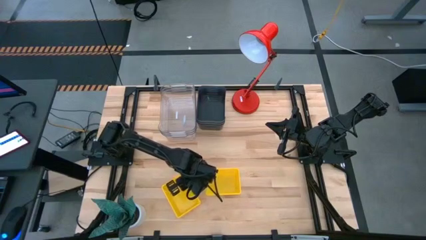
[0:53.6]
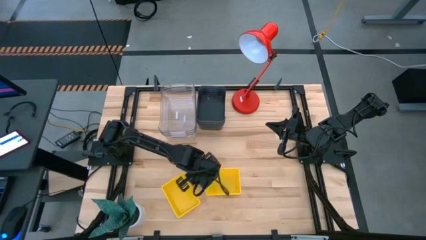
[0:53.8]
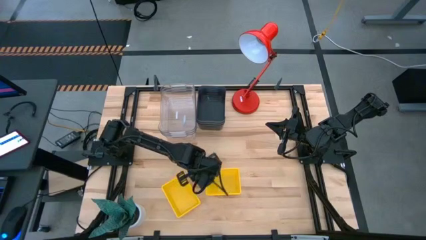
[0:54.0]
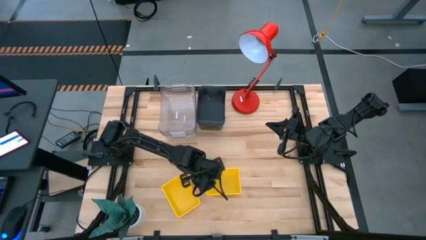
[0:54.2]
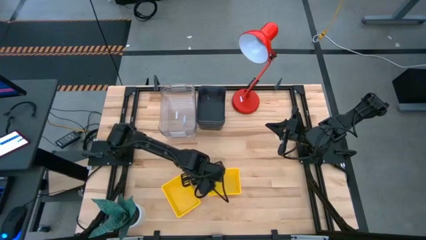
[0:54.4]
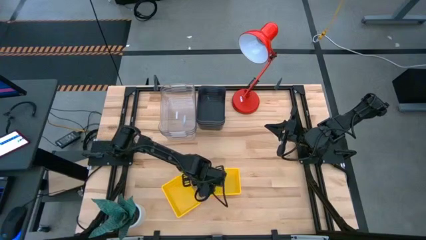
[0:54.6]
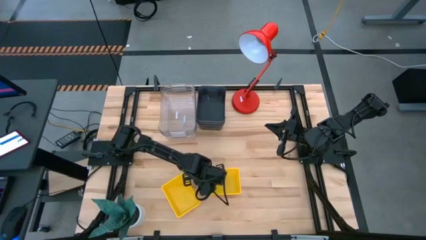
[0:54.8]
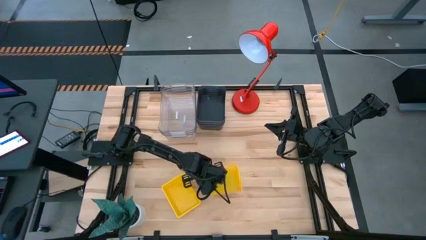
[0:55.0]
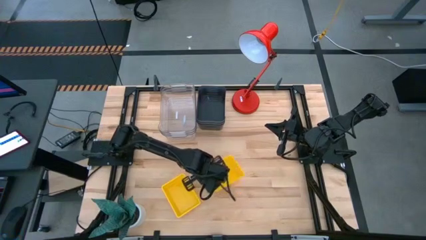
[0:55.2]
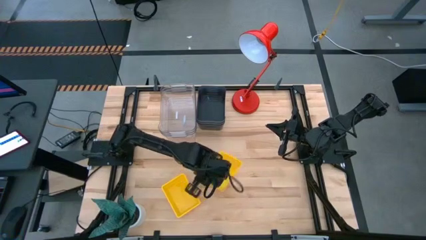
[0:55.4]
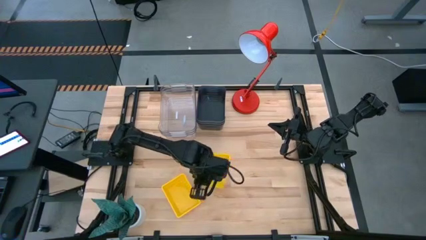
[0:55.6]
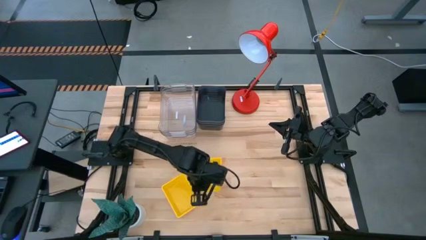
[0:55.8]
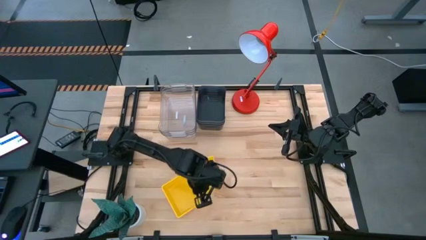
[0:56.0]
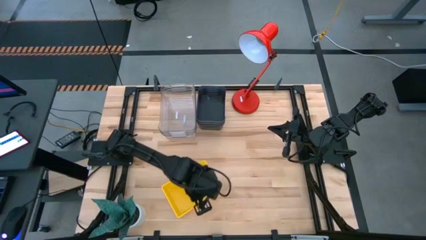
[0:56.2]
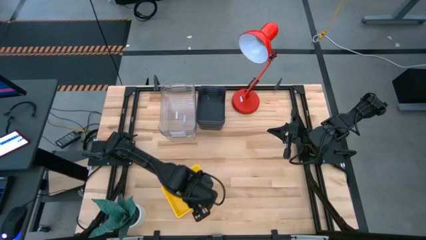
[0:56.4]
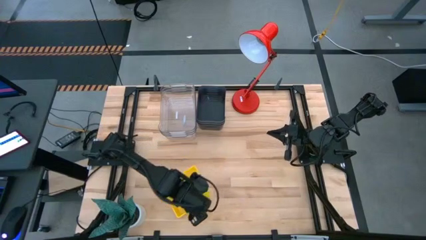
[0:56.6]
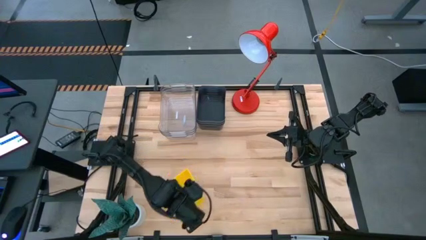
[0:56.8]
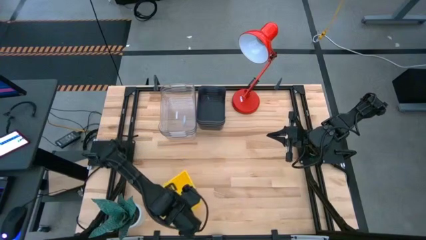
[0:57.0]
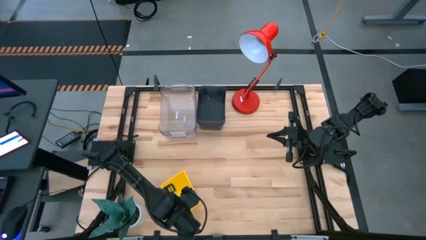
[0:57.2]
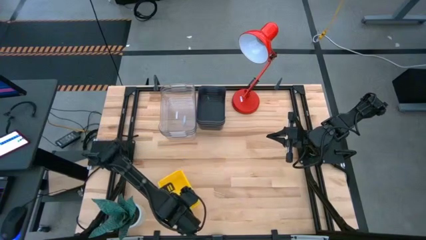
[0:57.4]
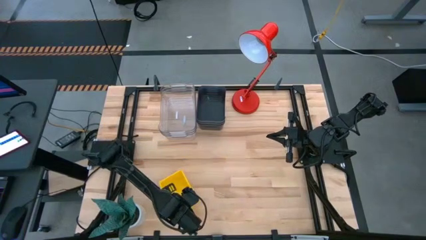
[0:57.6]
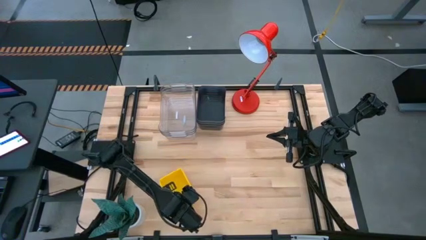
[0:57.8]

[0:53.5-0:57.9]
Stack the right yellow bin on the yellow bins

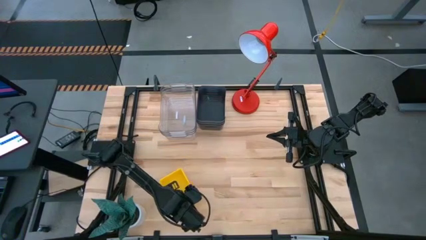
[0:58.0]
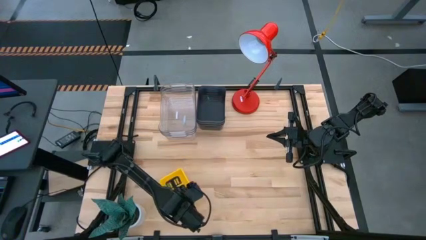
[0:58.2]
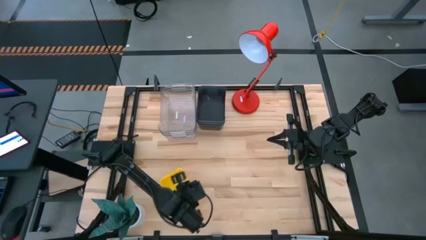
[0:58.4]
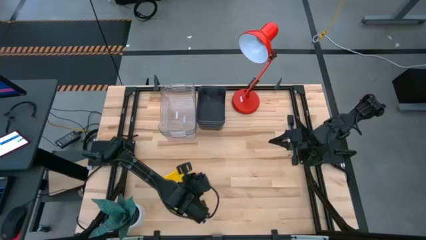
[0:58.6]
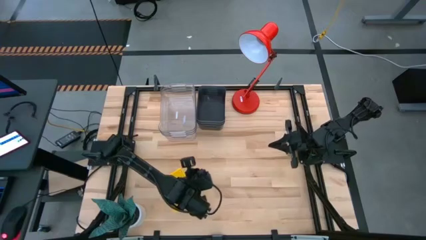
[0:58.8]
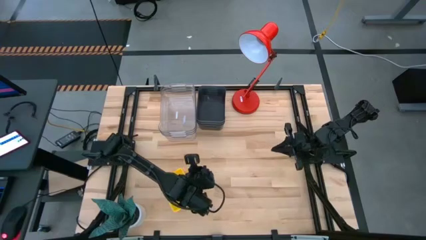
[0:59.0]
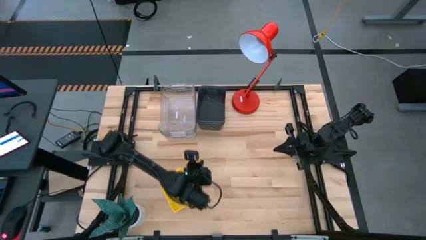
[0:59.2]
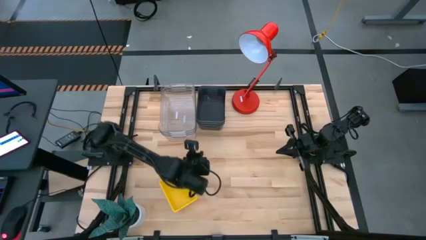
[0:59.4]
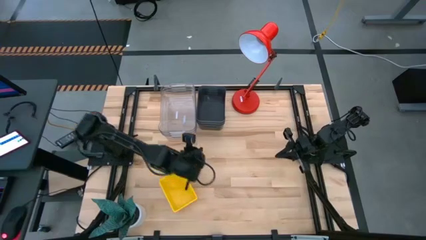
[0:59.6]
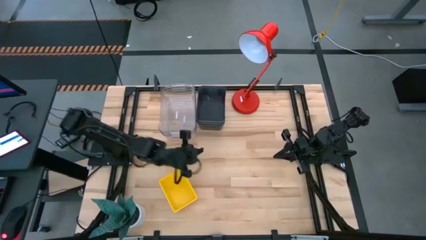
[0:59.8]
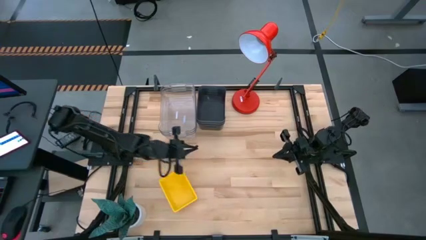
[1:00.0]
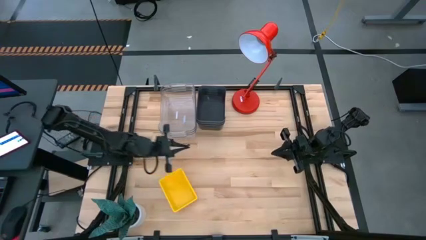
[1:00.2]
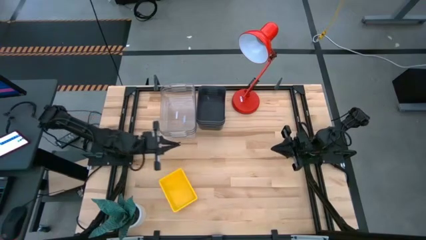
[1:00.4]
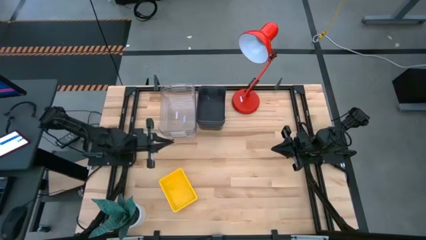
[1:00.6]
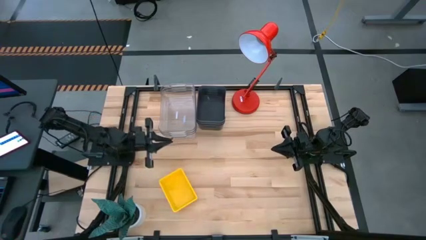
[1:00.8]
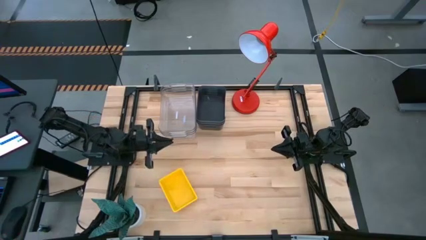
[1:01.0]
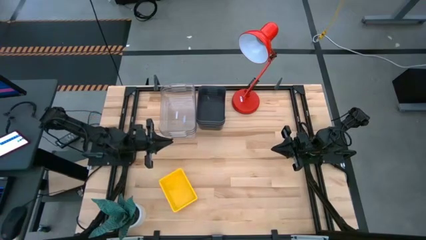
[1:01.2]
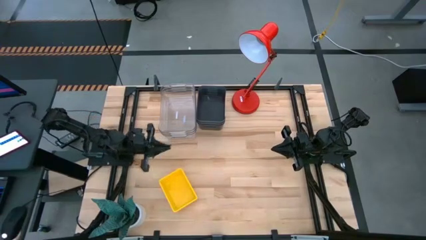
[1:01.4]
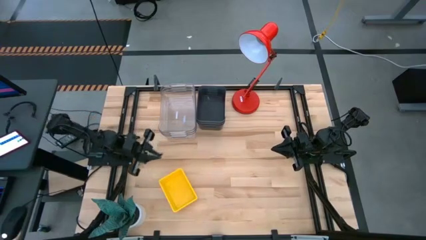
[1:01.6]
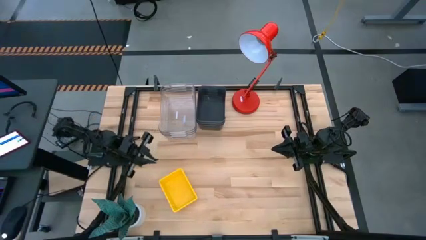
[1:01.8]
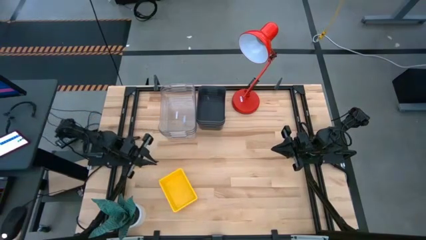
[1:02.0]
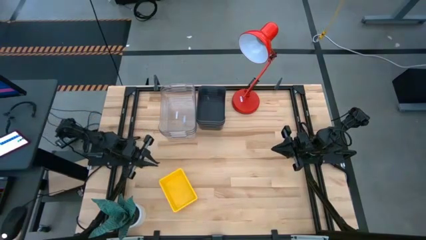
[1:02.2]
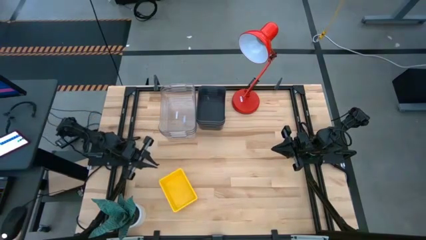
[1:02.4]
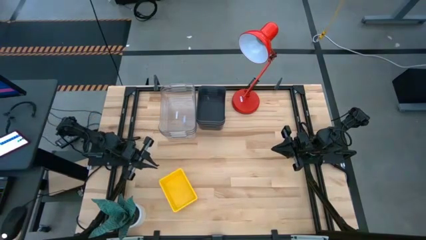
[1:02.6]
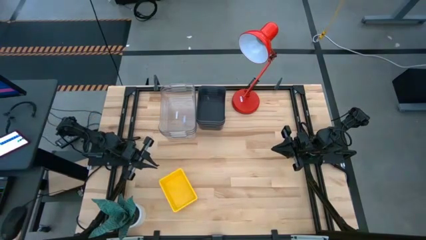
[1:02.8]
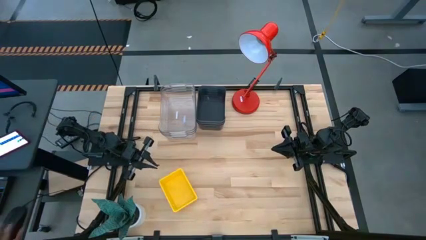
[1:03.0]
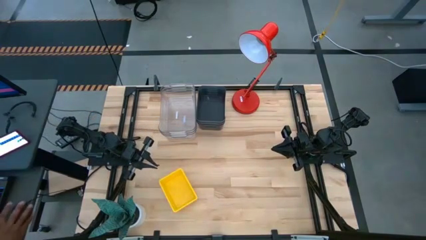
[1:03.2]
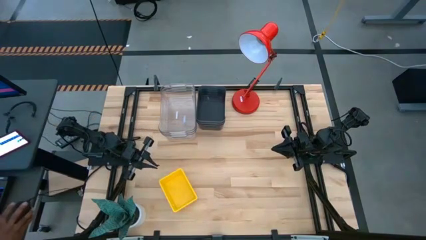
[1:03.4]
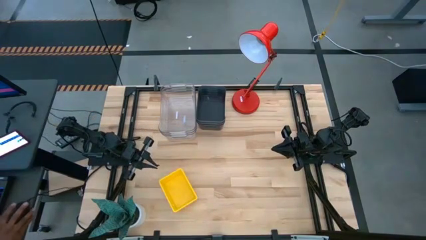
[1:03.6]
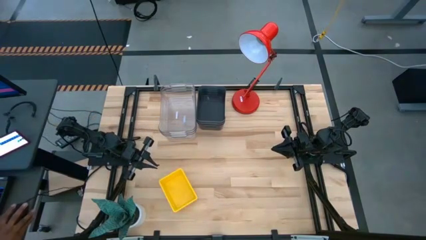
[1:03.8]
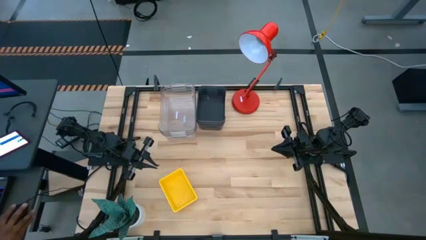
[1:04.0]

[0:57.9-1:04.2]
Return to Home Position

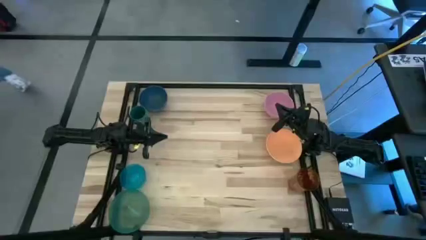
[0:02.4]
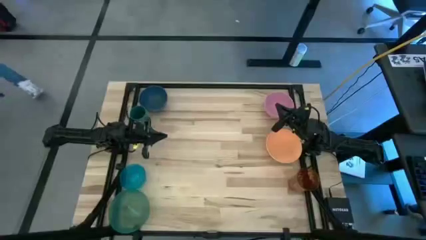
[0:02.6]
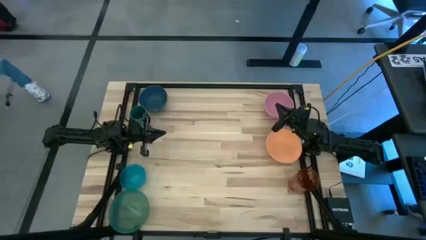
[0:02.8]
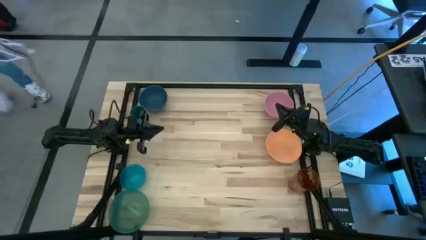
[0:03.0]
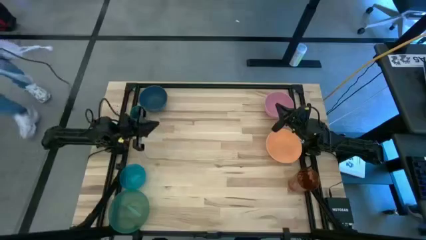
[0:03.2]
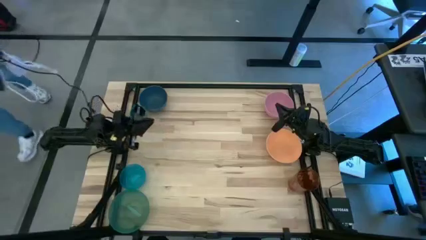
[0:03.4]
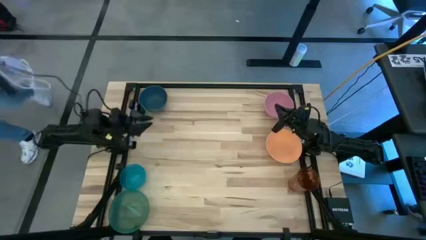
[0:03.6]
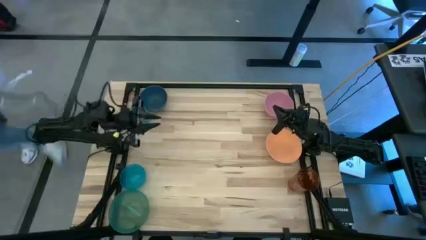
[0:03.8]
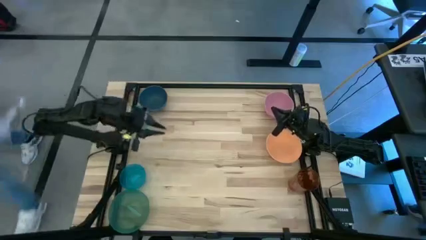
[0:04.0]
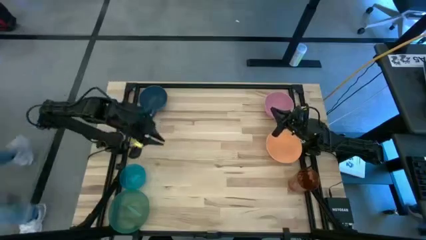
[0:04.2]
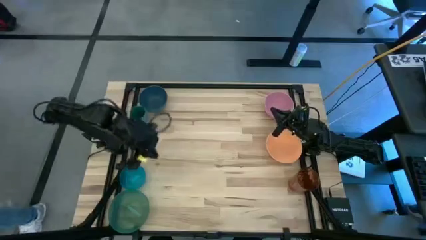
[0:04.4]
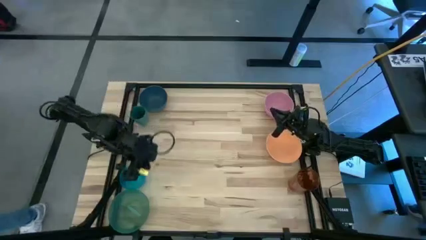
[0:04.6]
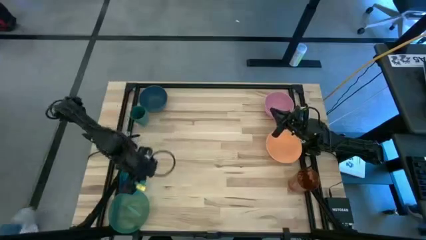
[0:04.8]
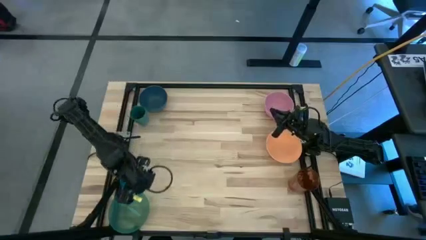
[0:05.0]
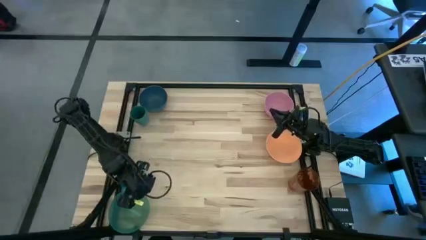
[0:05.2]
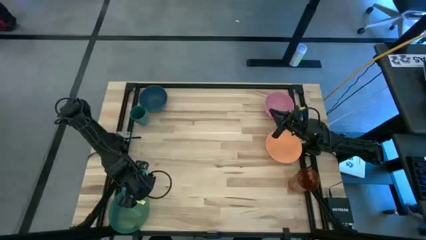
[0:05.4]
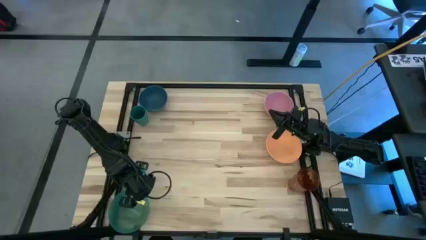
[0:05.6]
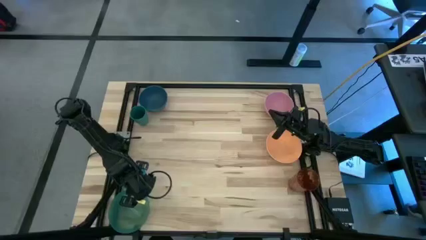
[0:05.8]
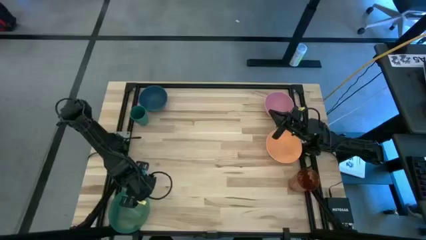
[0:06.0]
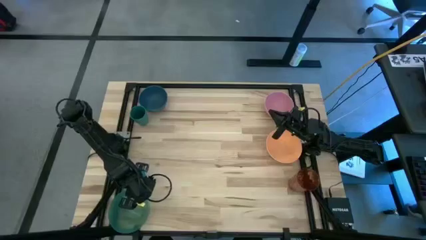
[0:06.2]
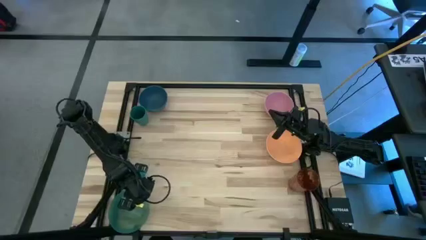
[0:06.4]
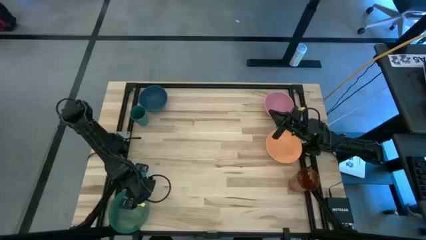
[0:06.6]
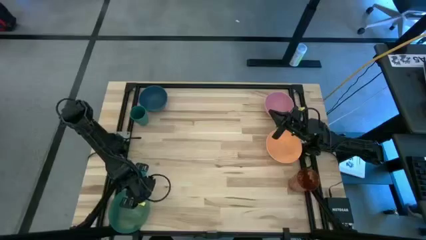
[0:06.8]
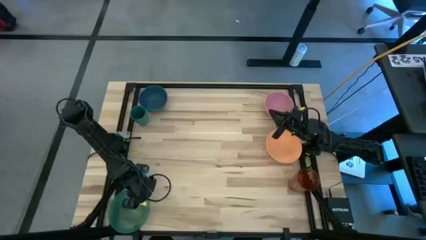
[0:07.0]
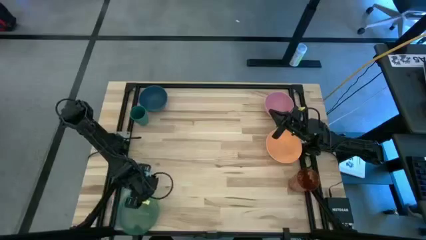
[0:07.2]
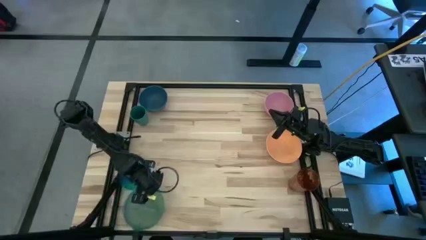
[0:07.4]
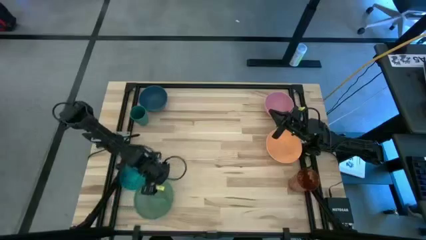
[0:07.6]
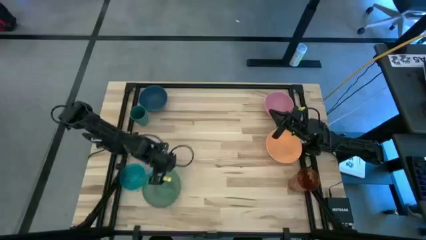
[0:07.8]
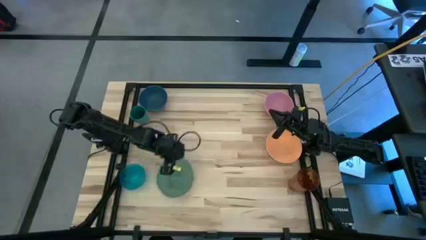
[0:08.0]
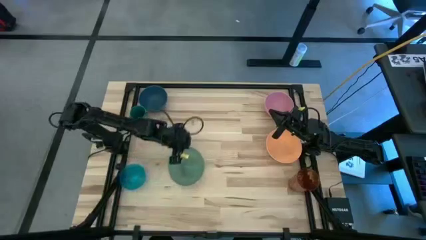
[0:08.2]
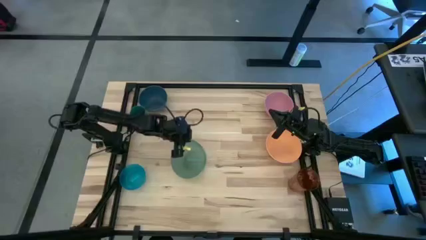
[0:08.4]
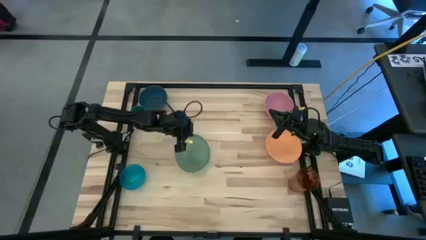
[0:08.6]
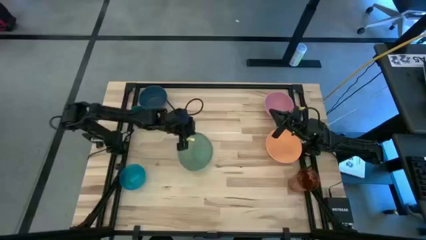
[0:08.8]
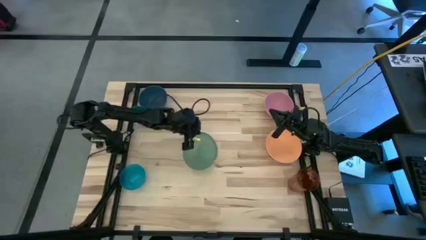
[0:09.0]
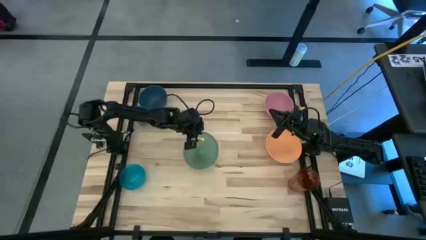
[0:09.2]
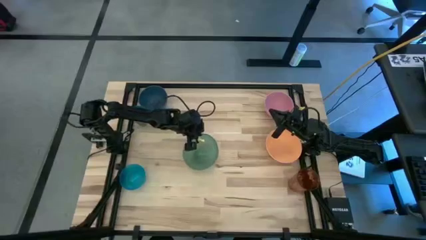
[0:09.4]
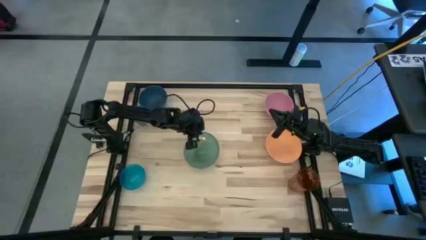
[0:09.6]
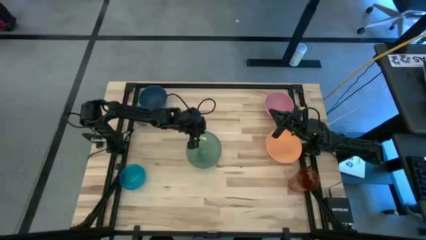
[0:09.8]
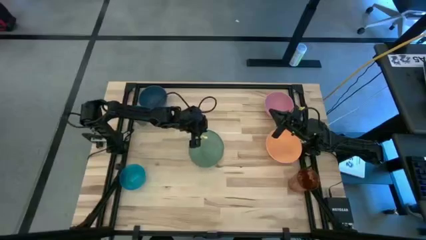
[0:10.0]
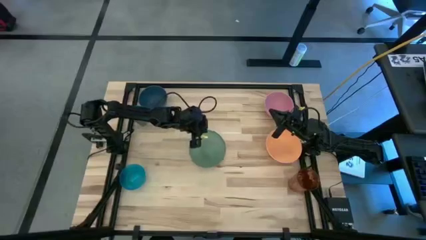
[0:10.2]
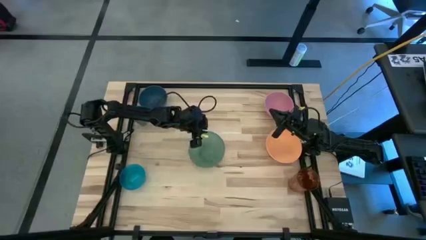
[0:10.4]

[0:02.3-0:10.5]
Move the green bowl on the table
